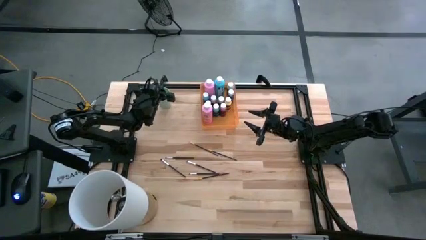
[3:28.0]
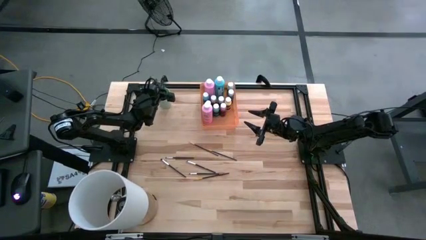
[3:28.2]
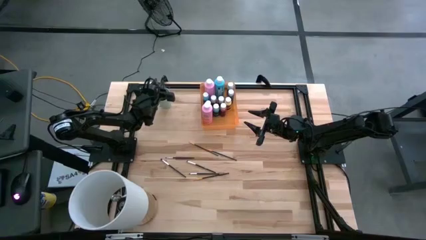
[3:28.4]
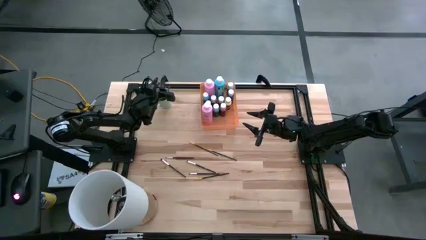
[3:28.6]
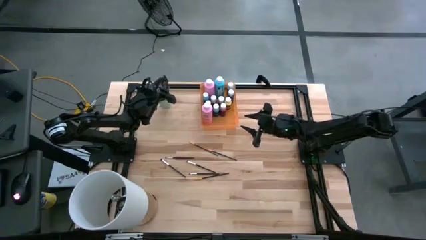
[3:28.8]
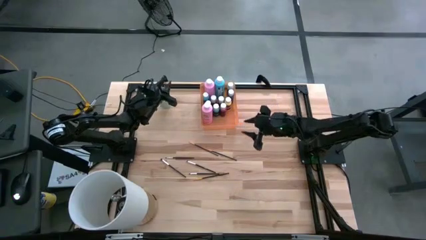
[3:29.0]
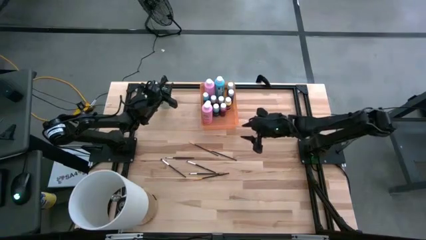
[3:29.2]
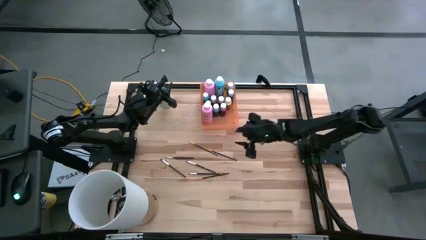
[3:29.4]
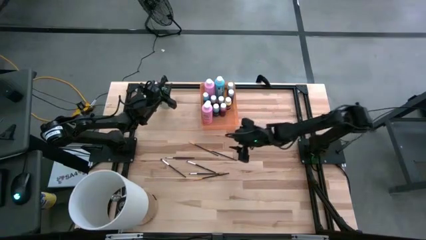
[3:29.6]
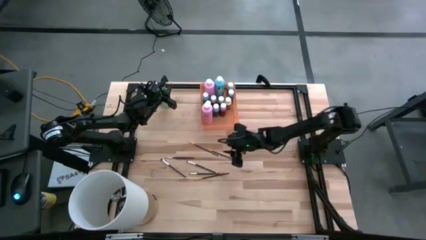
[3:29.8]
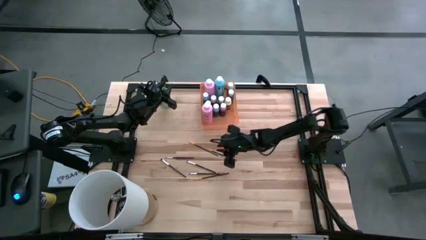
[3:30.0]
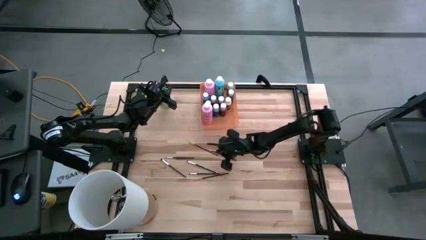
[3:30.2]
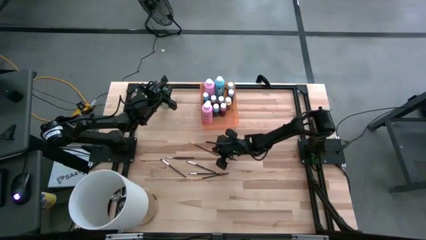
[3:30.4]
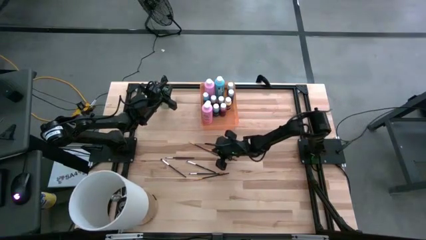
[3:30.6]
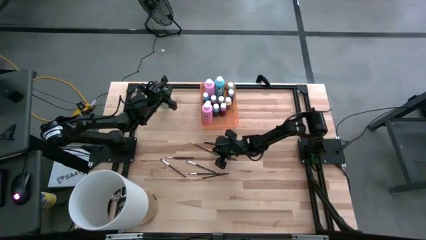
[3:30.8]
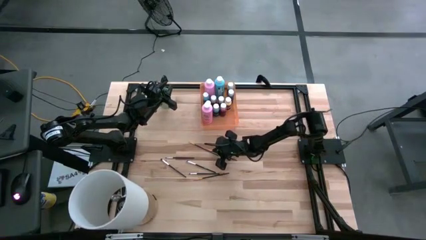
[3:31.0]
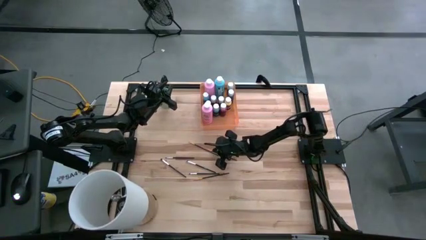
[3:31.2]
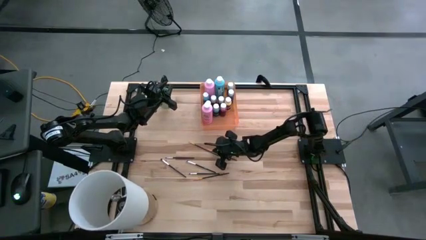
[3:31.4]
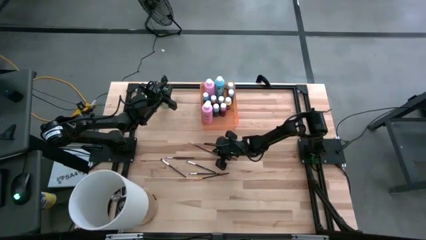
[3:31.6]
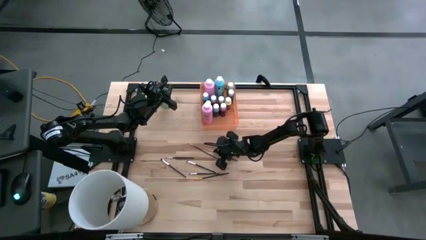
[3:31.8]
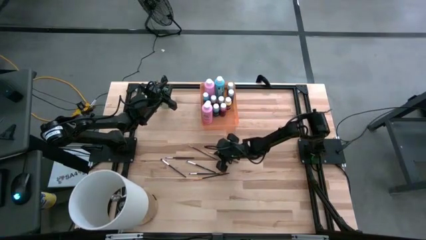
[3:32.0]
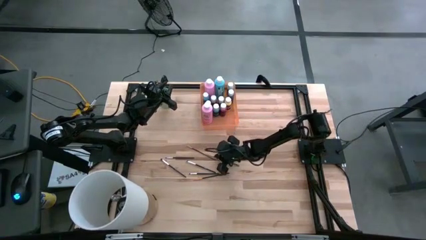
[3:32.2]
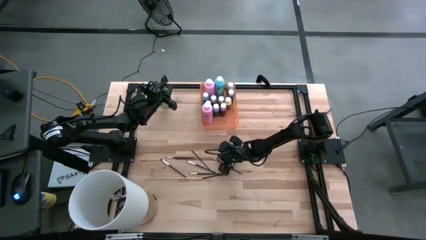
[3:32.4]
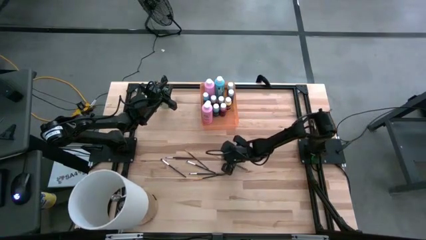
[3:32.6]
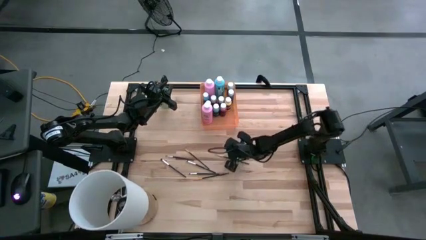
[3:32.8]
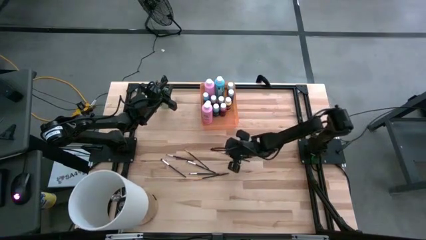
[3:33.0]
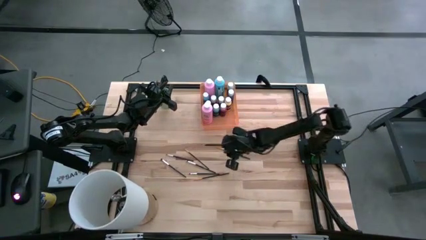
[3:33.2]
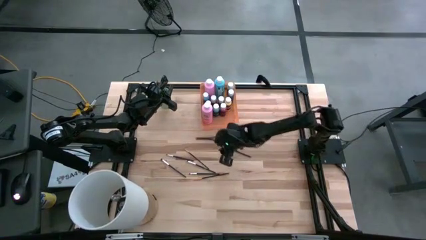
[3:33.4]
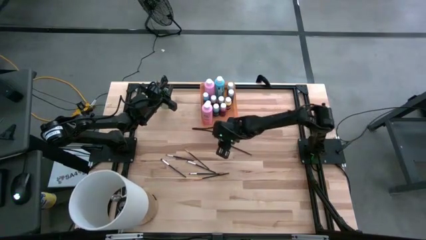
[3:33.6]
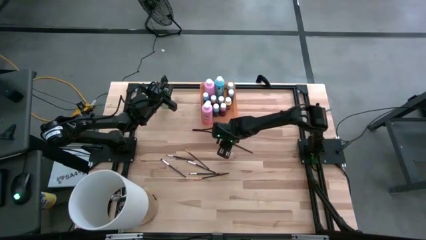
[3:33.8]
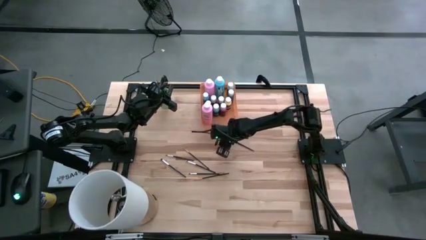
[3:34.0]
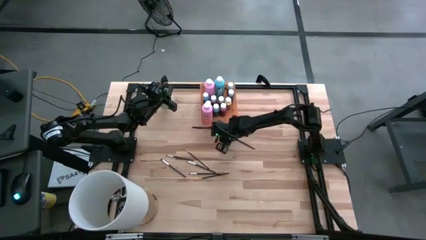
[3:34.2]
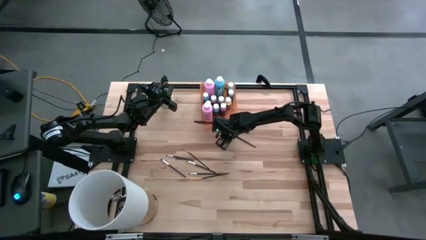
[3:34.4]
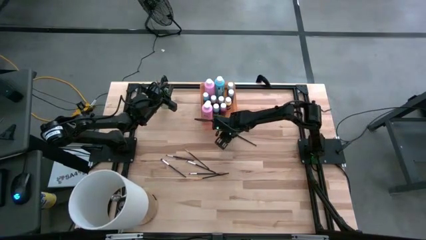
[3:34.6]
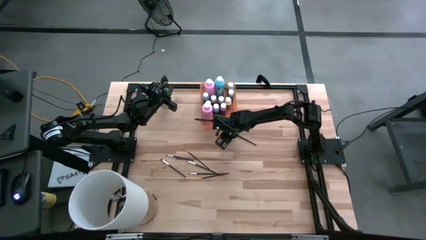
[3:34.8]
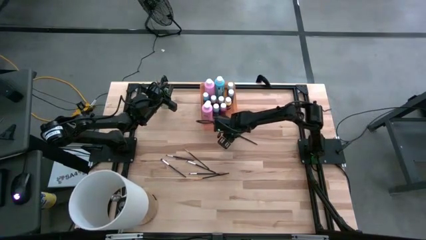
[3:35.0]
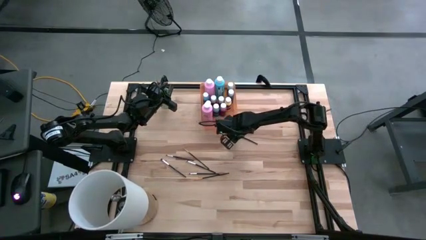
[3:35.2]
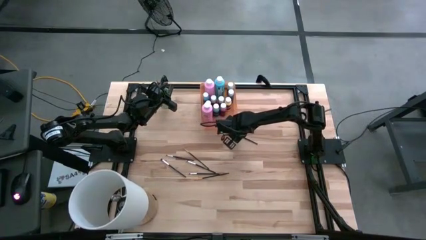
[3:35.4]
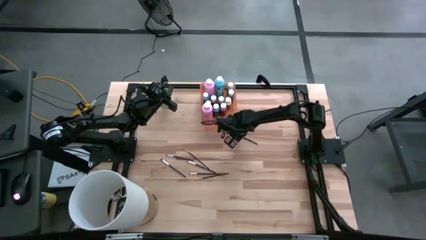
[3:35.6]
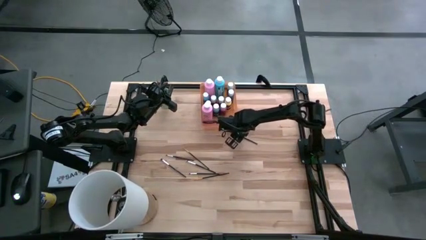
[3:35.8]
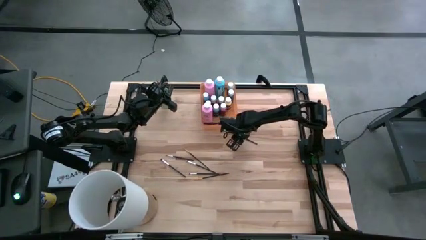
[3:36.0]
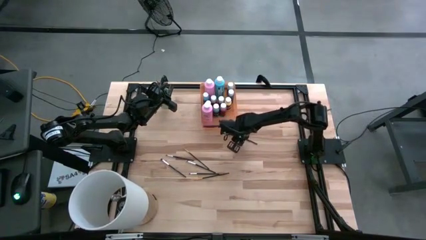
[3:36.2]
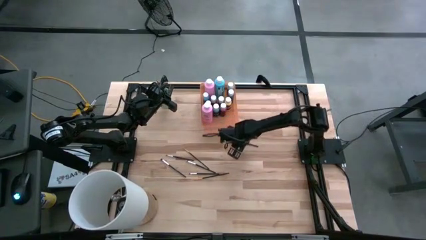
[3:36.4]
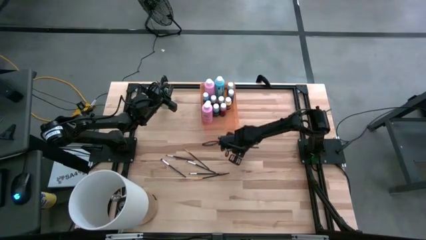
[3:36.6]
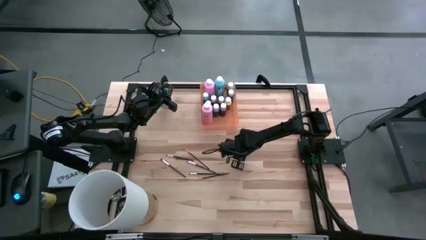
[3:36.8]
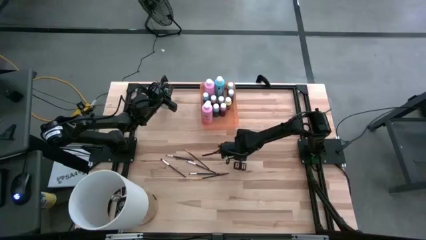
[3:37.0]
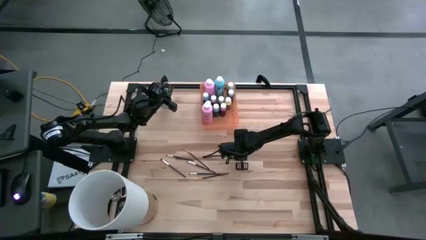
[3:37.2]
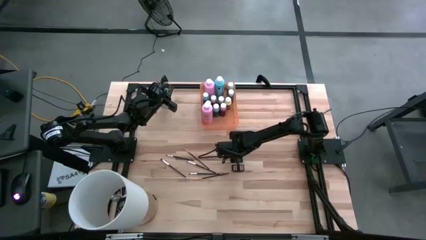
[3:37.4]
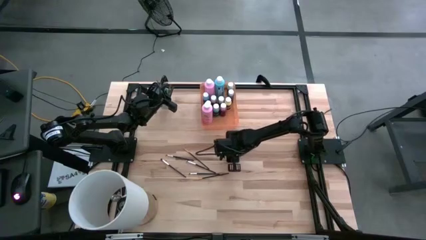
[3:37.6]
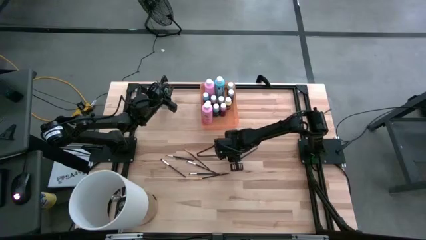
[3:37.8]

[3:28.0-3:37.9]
Task: Pick & Place Paint Supplies
Put the orange paintbrush into the cup
